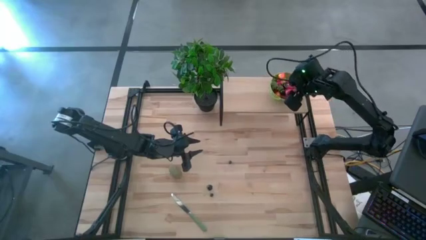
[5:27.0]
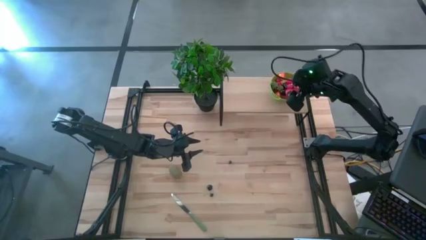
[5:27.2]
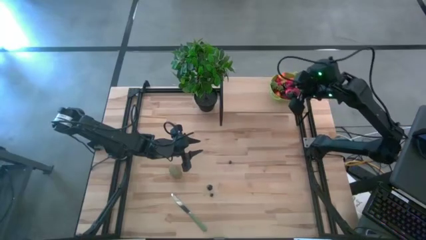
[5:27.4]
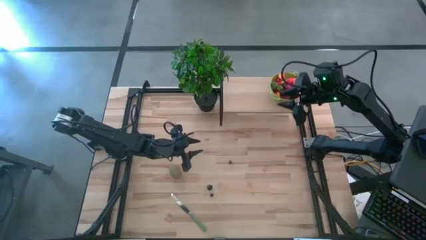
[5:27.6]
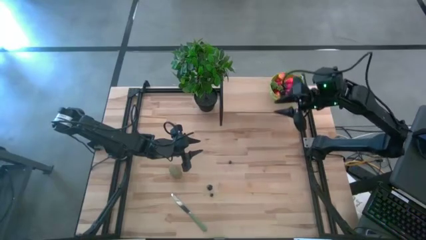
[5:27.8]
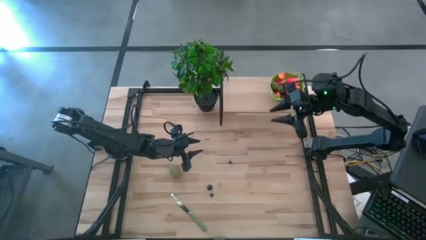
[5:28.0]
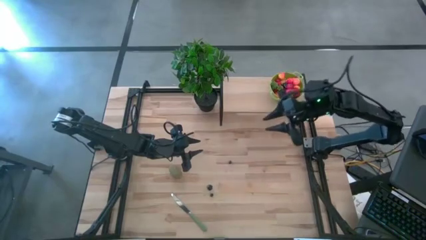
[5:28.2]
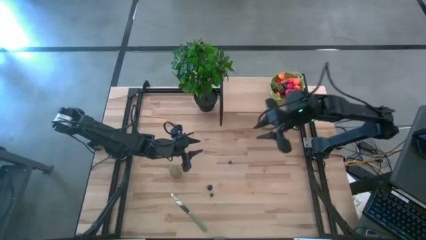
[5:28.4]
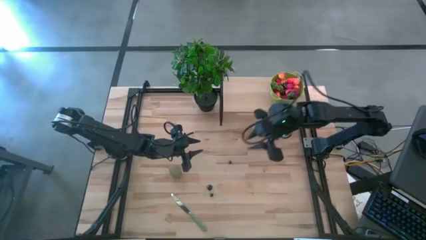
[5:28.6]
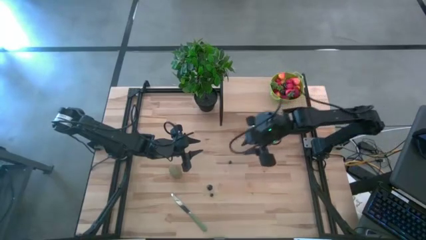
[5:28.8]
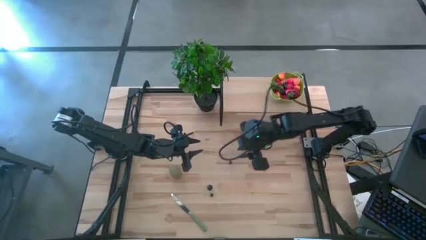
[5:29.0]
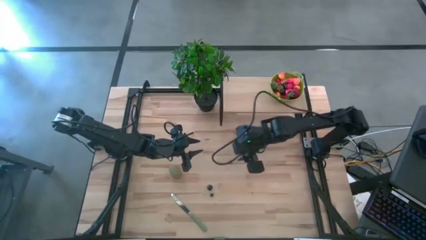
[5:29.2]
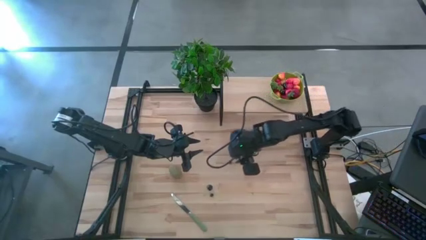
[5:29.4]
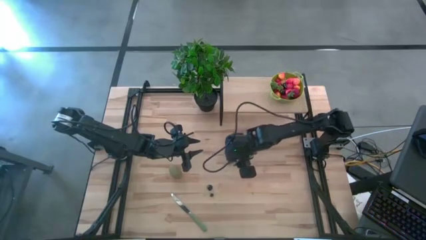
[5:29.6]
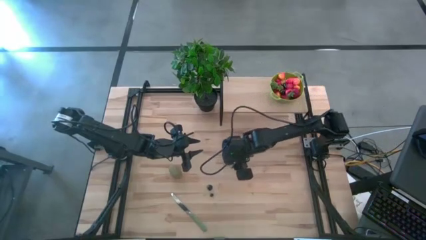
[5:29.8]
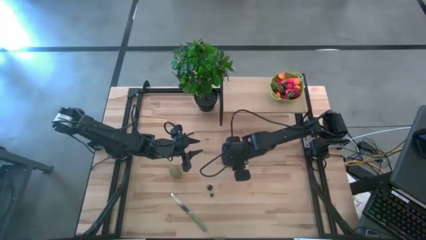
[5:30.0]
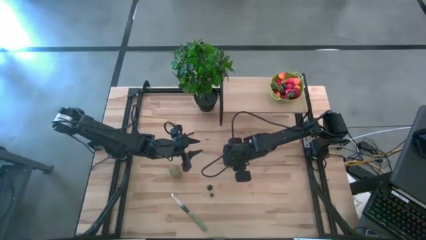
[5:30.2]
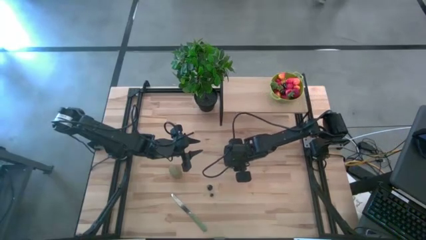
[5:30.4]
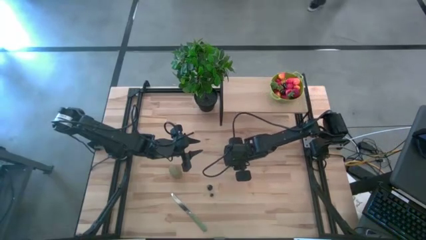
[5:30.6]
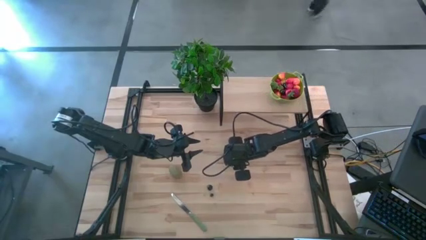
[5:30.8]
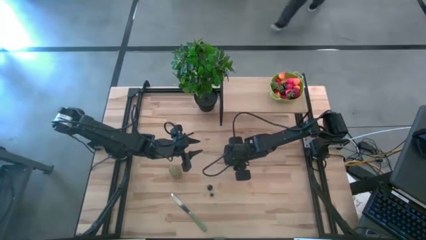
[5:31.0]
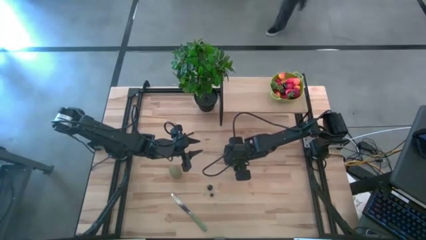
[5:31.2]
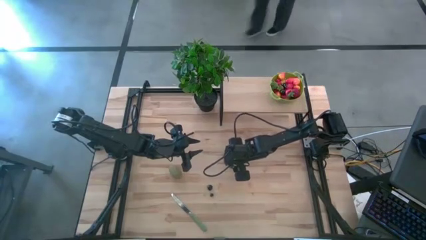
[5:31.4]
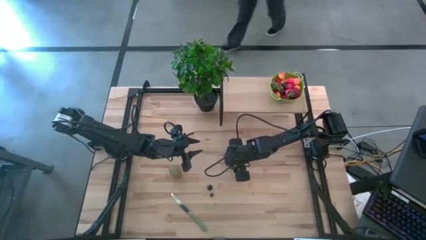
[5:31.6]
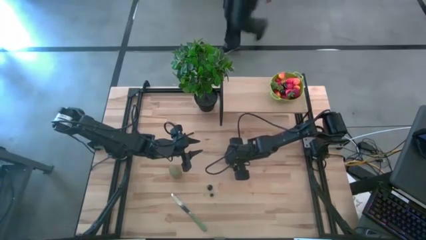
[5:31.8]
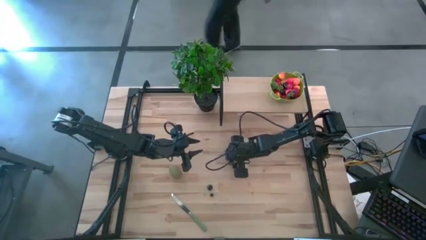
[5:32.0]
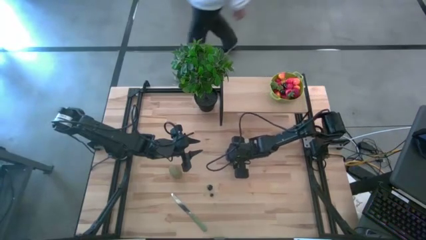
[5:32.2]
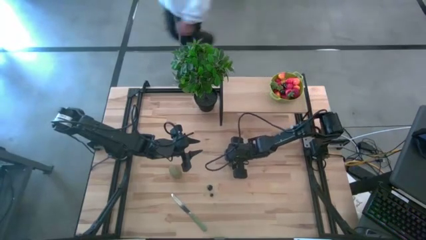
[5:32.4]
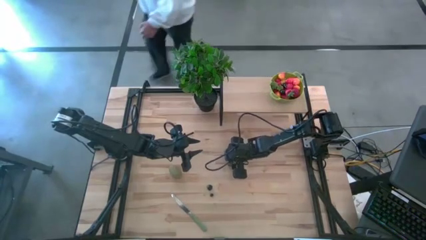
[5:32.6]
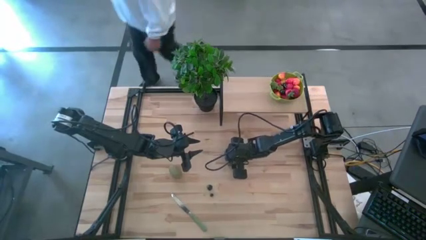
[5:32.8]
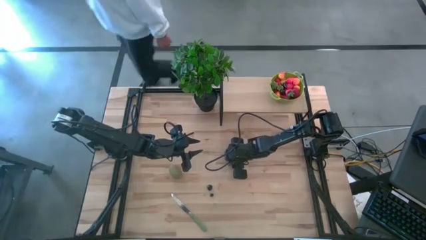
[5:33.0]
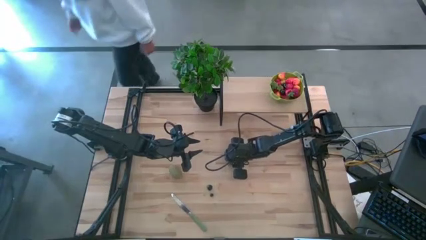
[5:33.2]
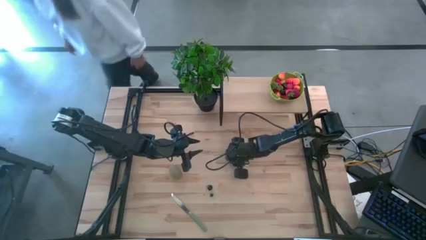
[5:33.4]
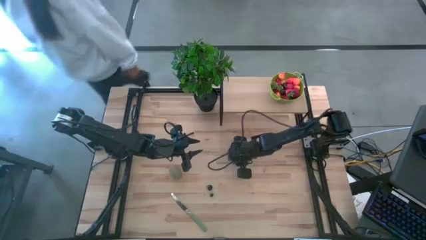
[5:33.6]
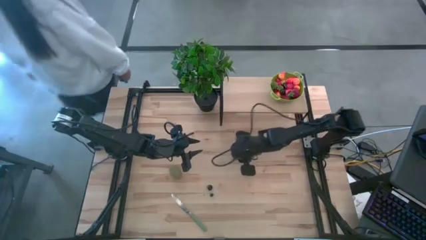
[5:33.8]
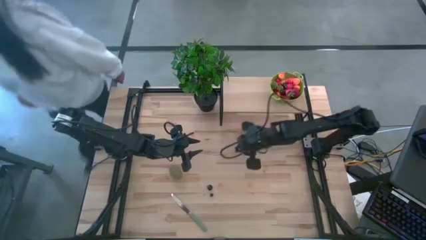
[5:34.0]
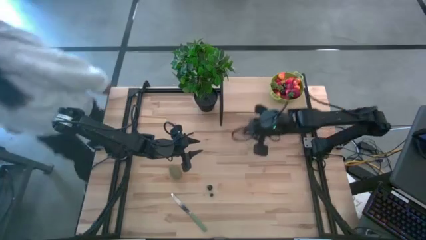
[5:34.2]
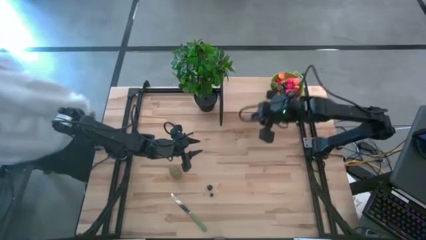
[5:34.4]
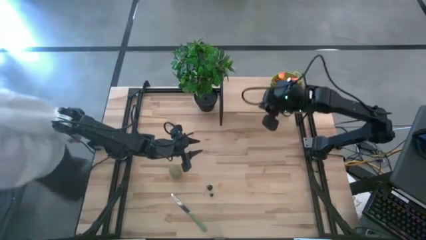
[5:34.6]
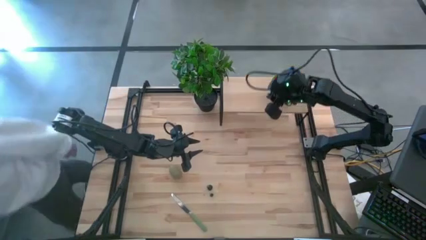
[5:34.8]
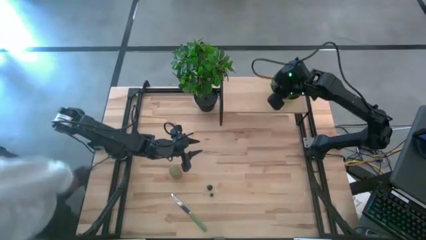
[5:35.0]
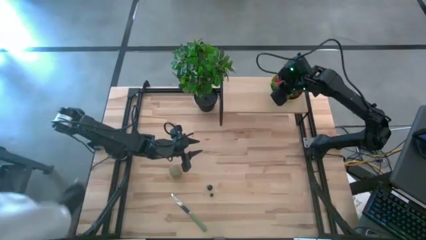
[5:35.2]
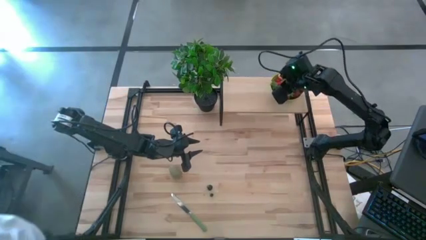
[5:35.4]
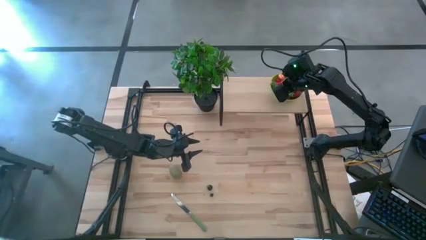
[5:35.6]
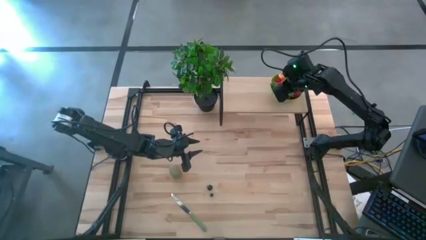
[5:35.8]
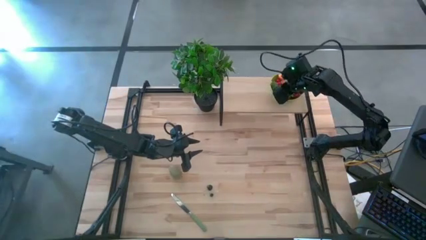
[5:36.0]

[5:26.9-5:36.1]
Task: Pick & Place Fruit
Put the blueberry into the green strainer bowl on the shelf

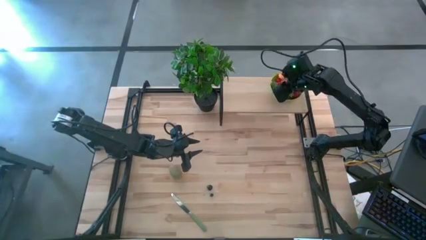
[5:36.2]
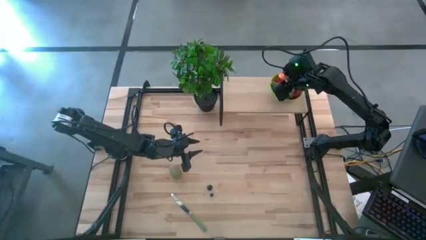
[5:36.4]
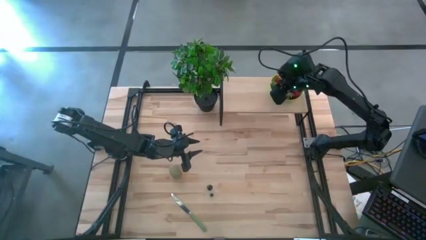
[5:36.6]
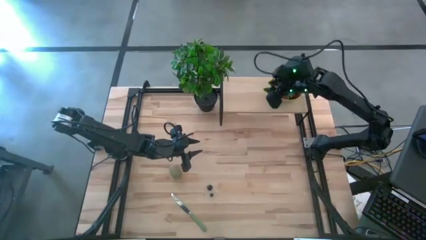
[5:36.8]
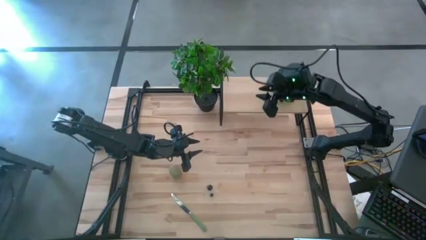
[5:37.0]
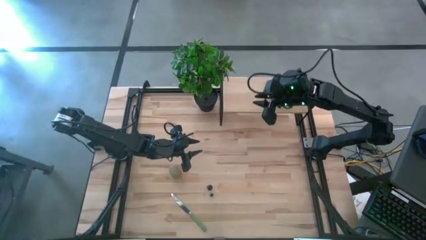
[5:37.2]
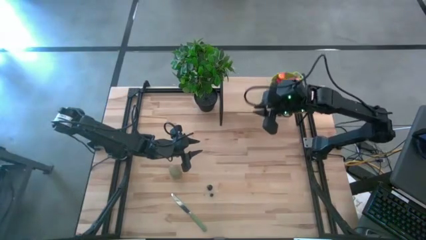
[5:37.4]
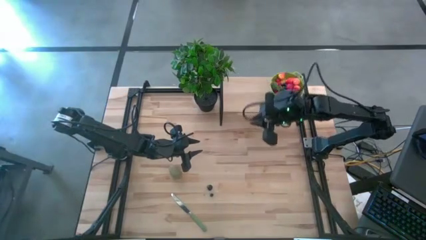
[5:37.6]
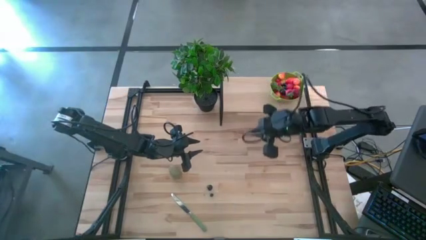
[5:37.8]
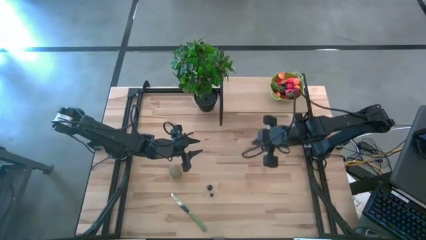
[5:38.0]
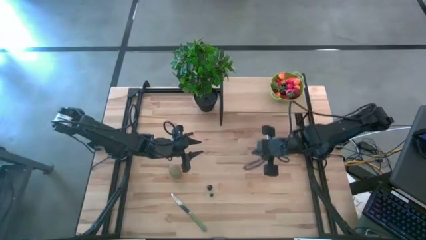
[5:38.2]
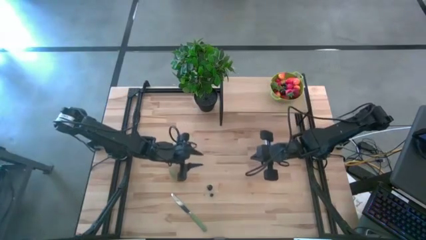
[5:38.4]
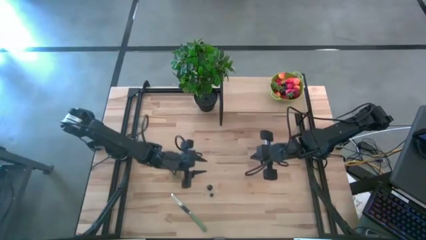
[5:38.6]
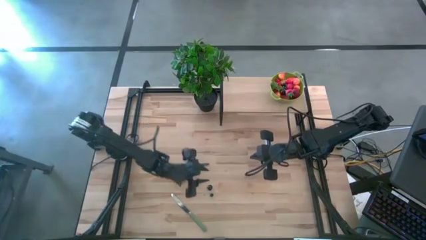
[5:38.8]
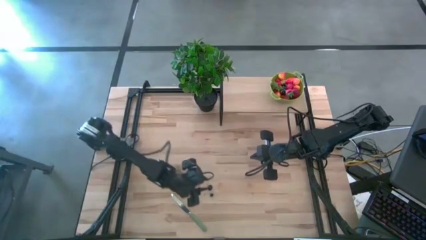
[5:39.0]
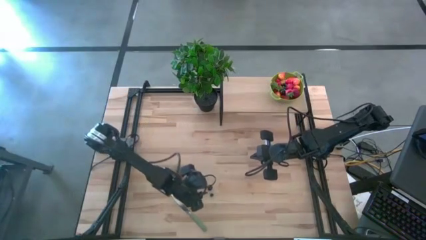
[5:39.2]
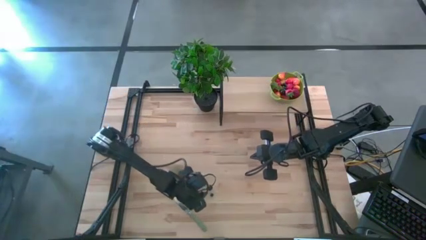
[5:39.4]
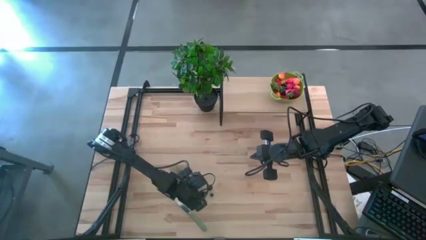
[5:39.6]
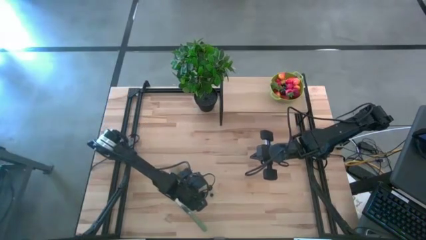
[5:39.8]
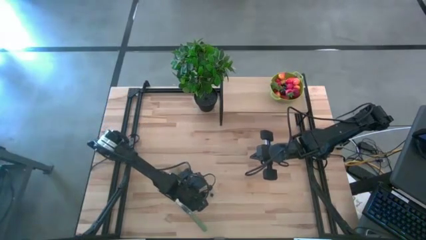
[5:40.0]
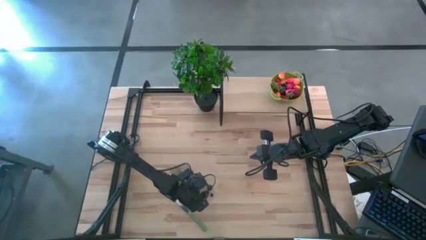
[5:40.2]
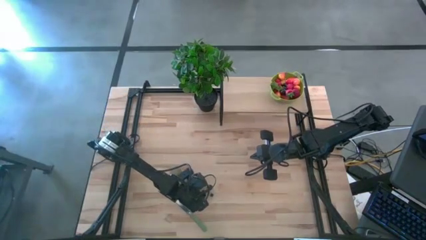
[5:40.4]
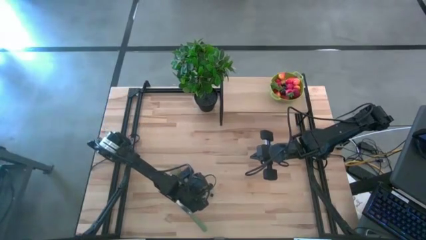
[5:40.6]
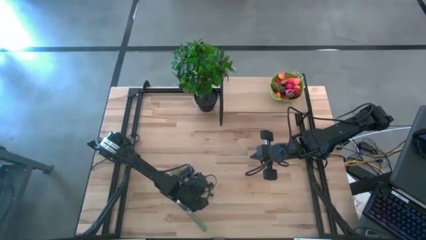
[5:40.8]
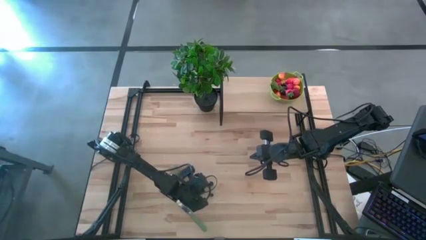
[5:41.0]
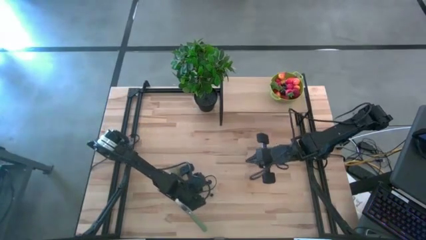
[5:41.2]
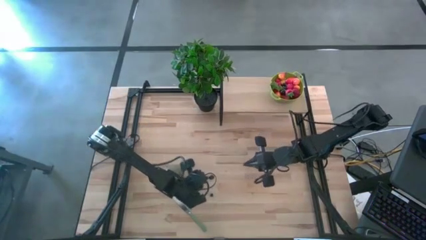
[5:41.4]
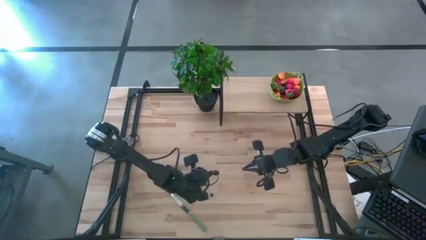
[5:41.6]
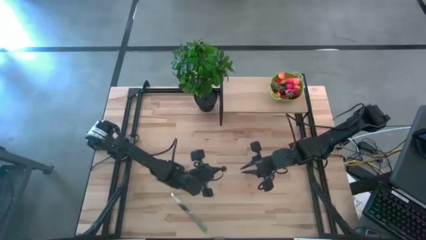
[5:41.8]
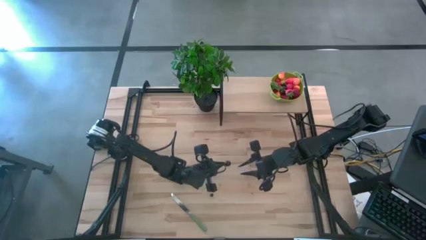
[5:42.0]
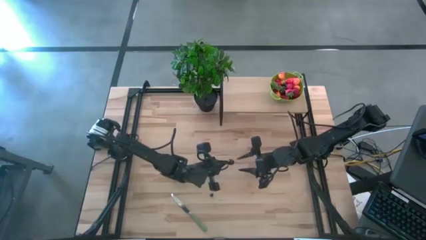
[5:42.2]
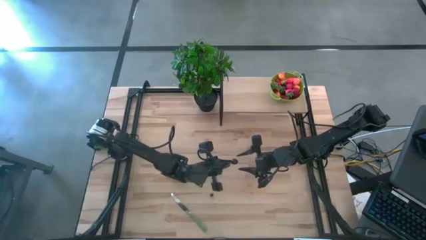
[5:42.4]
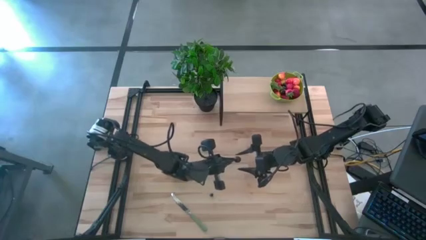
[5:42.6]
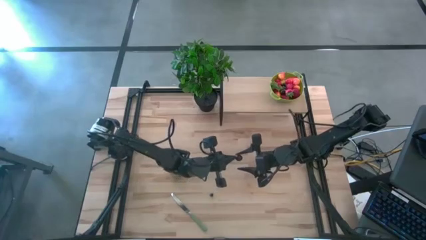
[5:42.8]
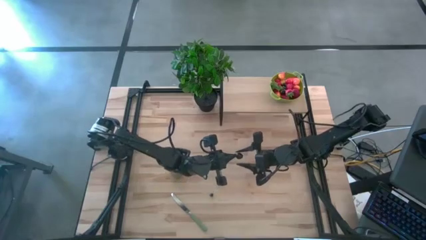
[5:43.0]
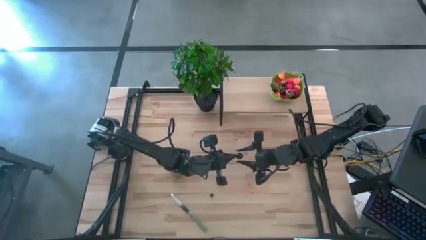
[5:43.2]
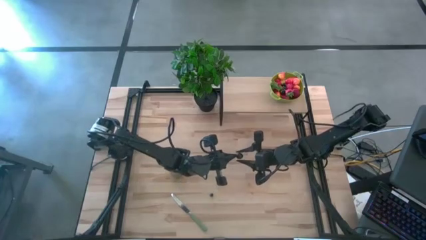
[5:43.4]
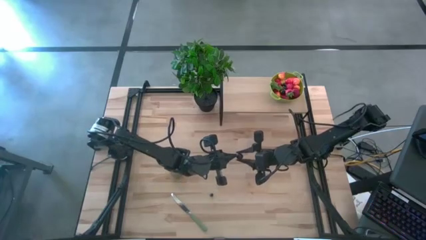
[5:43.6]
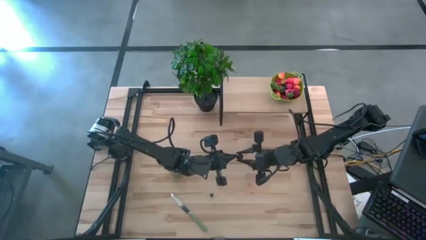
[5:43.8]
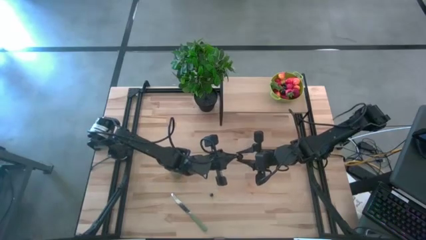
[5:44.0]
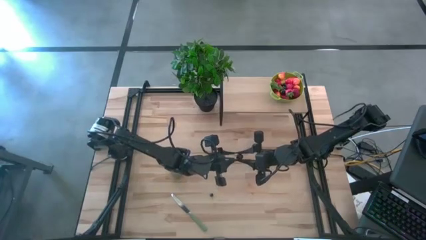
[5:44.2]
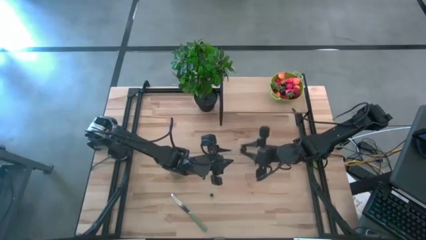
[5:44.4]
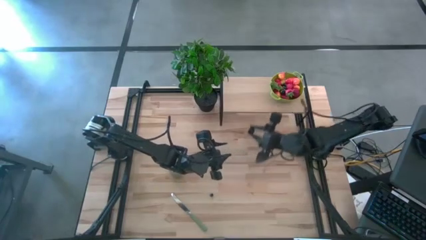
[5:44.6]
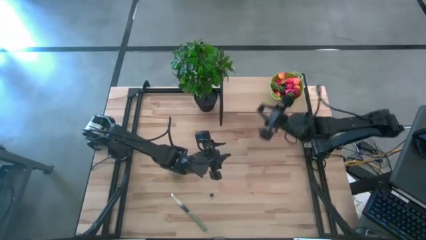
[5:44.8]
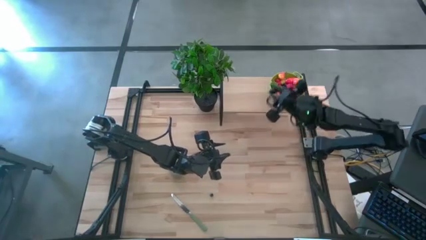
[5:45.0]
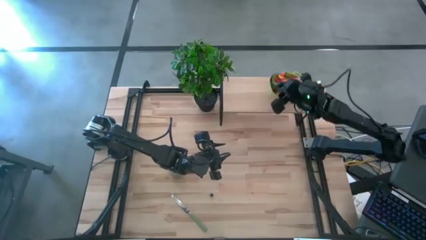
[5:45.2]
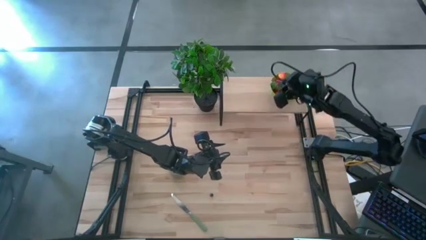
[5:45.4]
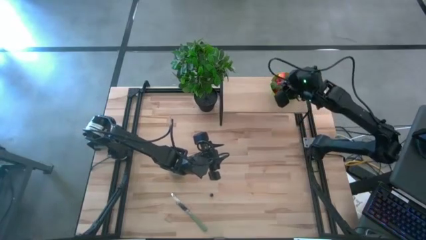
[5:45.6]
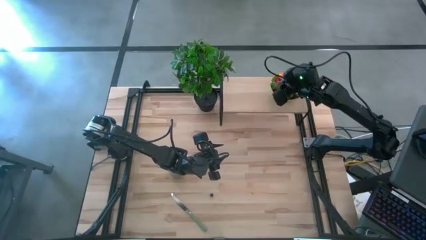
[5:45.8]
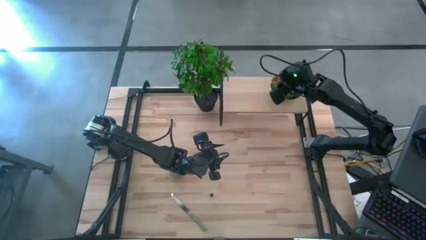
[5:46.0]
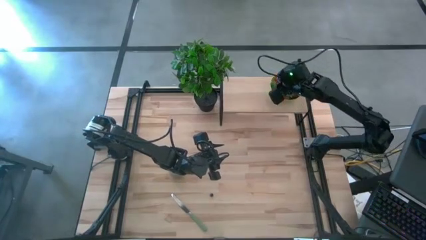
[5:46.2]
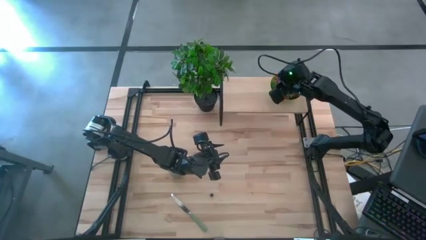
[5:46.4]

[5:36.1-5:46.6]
Put the black cherry into the green strainer bowl on the shelf
